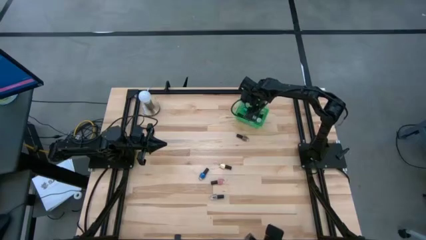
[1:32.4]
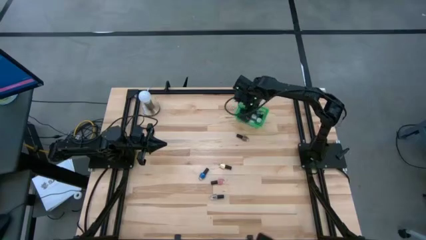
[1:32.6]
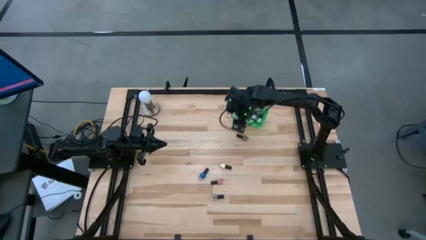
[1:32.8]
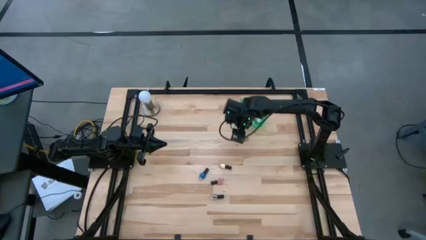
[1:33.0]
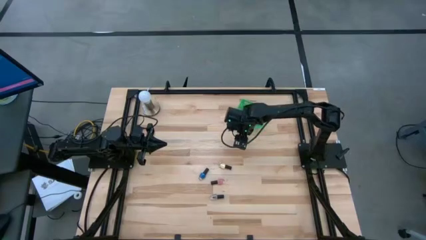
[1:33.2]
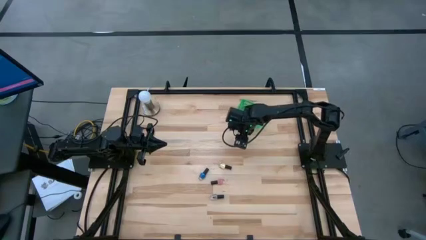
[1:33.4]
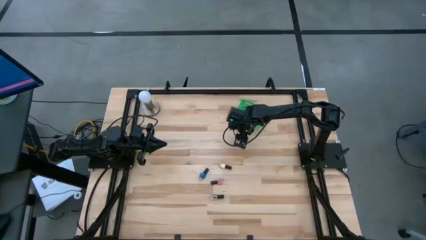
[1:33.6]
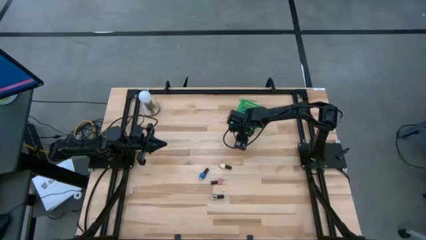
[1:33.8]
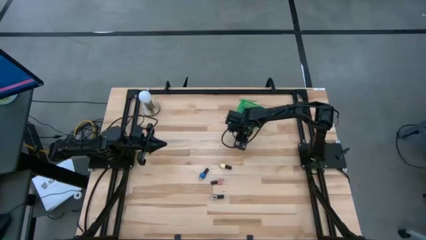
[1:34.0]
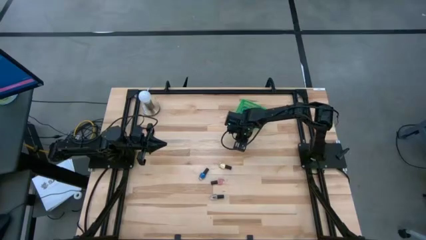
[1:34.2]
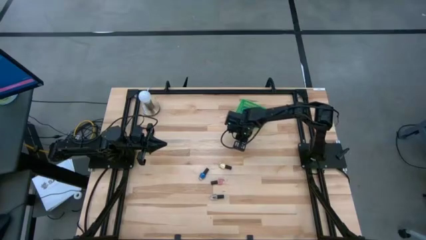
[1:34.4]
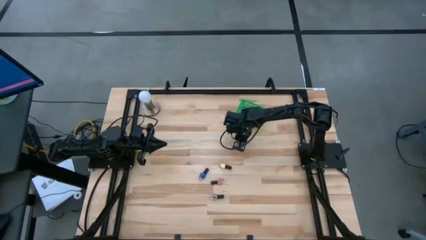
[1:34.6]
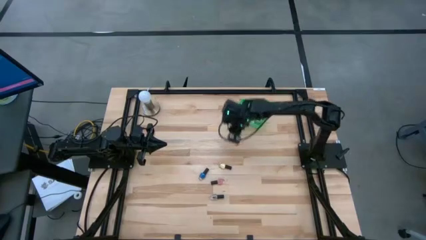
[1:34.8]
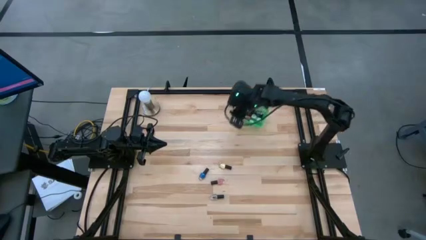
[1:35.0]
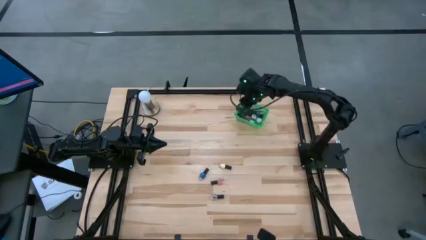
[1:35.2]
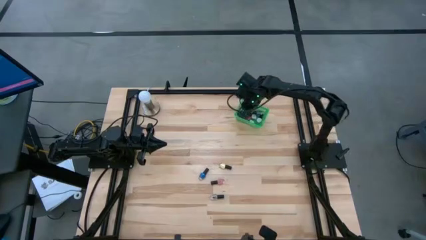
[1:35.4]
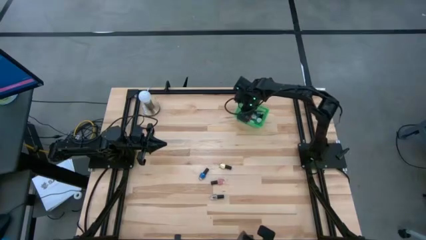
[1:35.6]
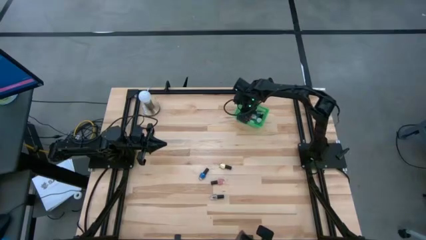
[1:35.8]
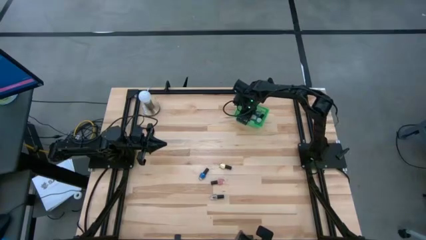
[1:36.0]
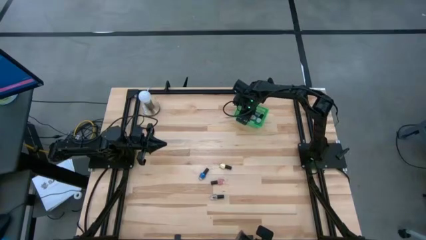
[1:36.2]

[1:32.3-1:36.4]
Task: Pick & Place Nail Polish
Put the brown nail polish into the green bin

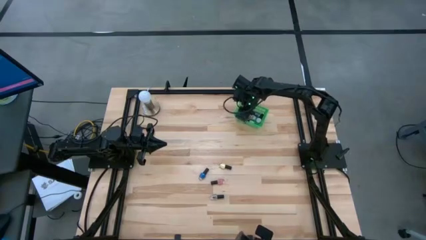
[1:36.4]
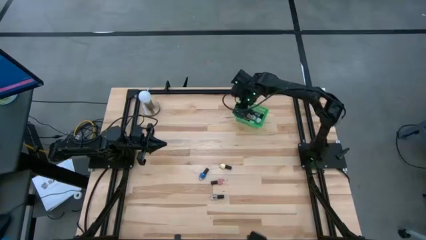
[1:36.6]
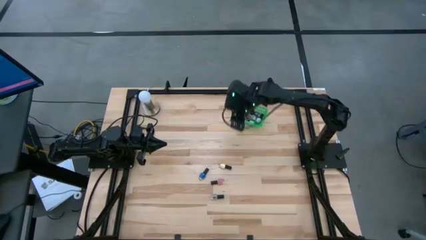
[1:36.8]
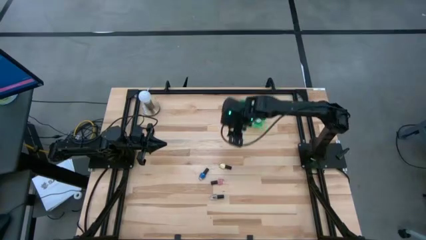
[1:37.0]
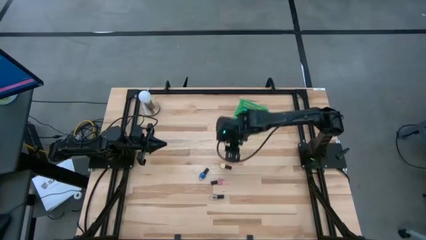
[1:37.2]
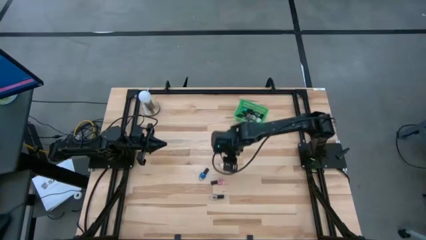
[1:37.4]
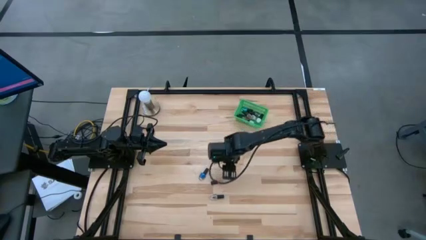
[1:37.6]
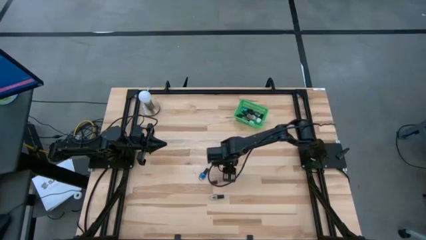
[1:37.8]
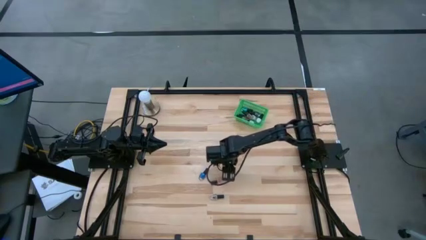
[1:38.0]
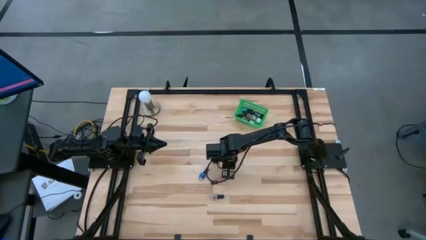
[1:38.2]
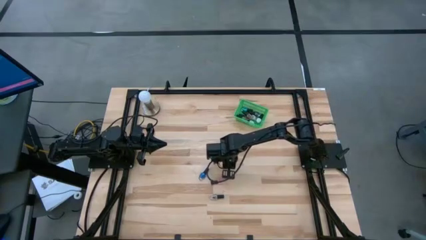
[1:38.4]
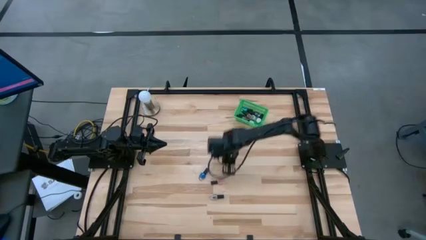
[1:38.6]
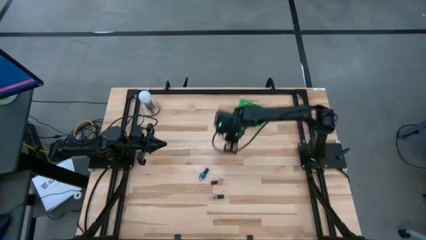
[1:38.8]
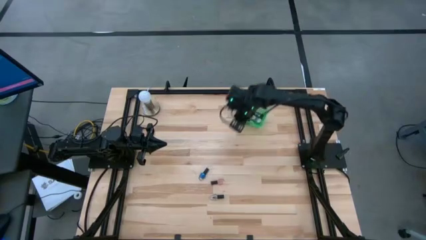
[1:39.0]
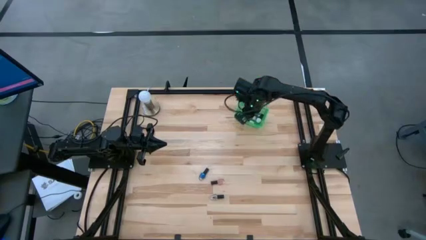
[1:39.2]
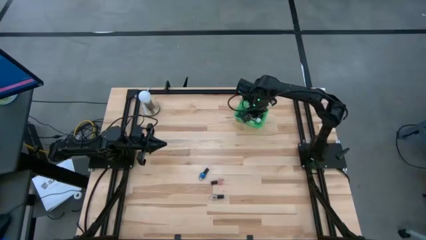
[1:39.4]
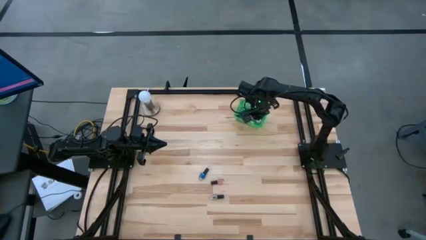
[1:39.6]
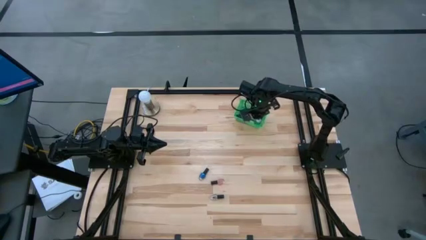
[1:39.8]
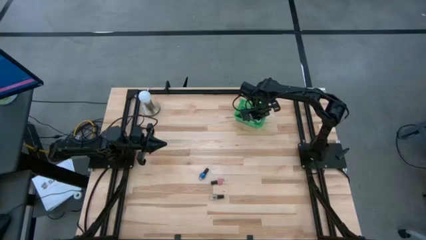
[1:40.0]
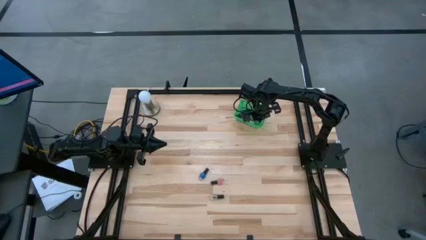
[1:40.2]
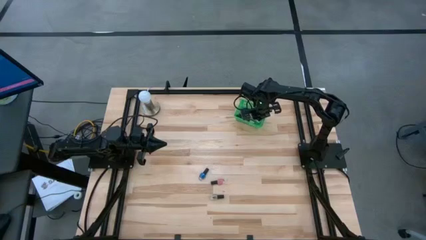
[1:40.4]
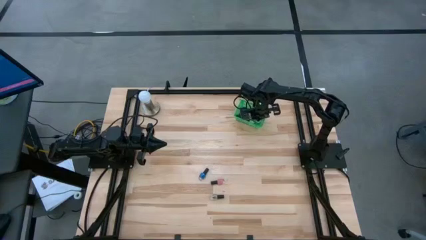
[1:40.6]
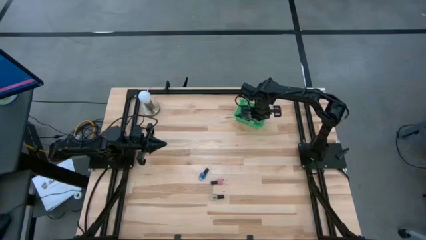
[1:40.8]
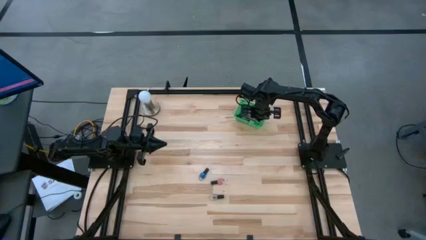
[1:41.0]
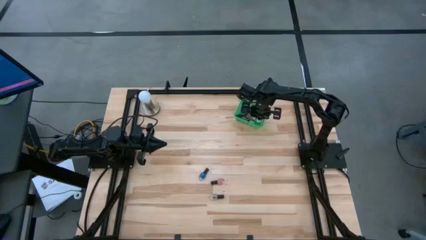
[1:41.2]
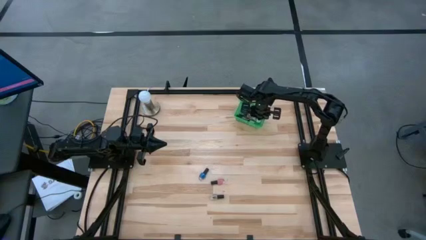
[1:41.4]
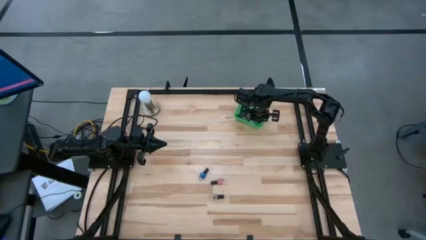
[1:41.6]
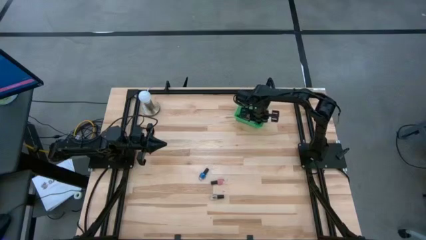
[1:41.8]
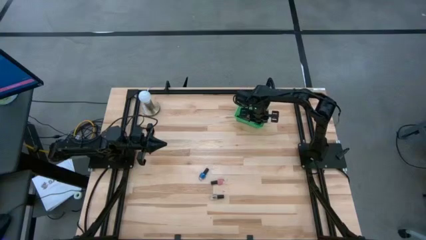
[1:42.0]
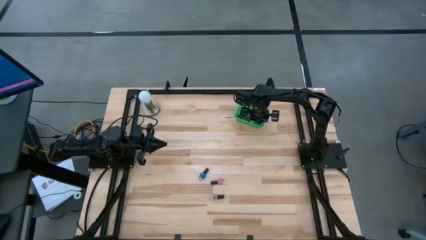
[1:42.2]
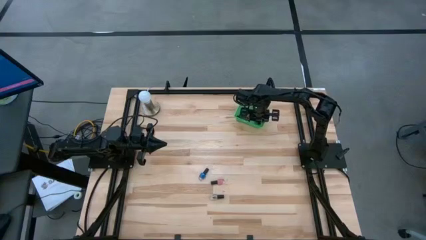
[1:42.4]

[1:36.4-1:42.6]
Put the yellow nail polish into the green bin

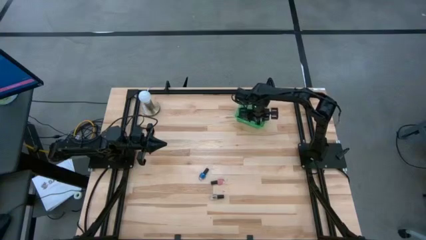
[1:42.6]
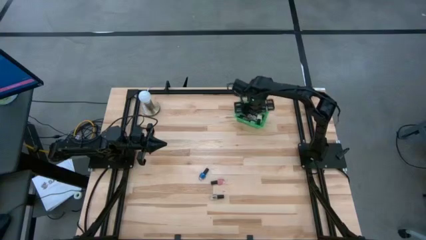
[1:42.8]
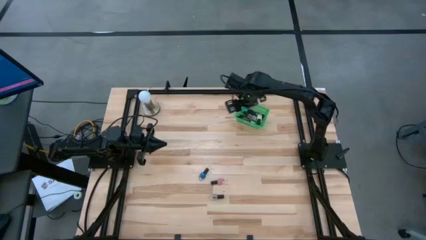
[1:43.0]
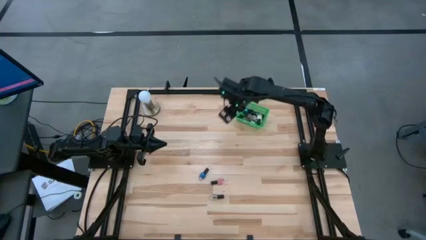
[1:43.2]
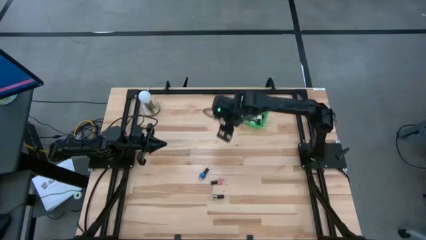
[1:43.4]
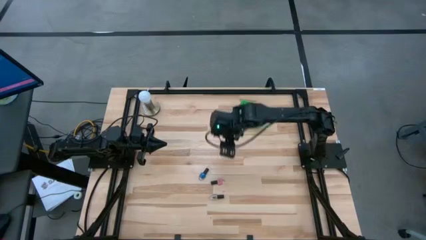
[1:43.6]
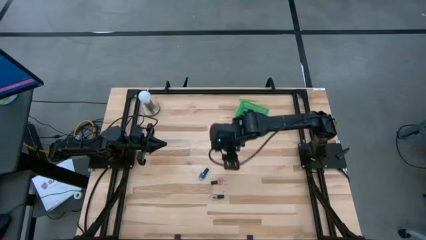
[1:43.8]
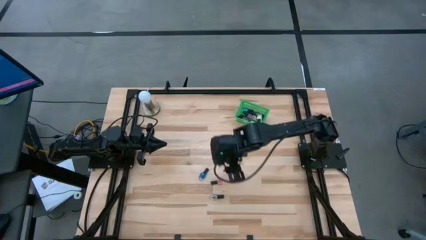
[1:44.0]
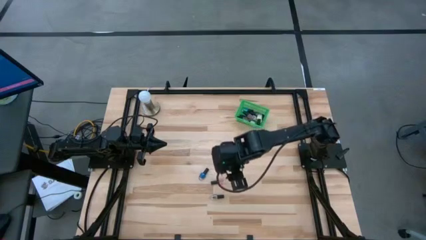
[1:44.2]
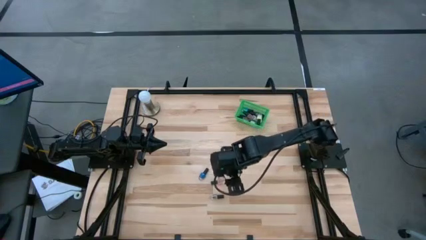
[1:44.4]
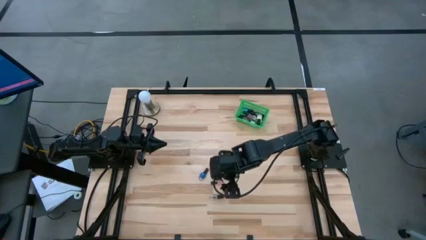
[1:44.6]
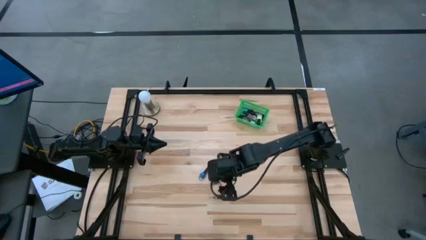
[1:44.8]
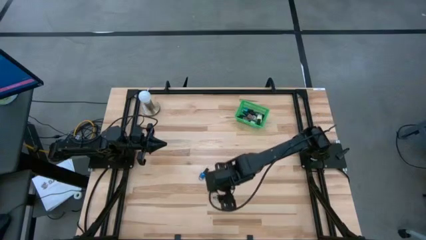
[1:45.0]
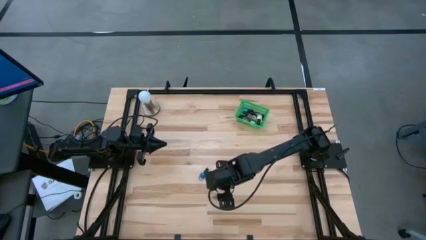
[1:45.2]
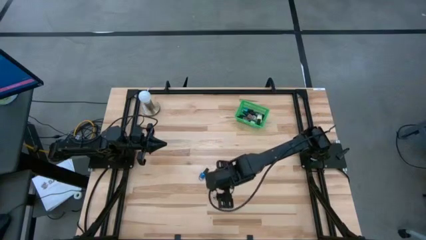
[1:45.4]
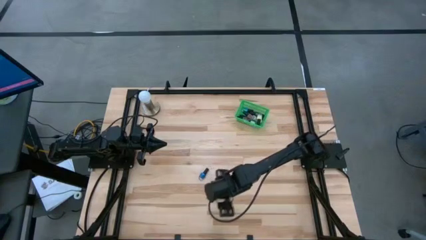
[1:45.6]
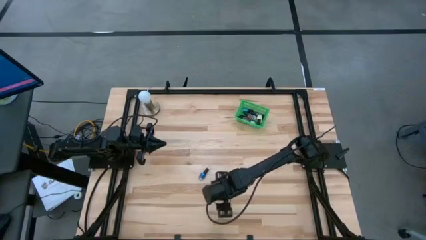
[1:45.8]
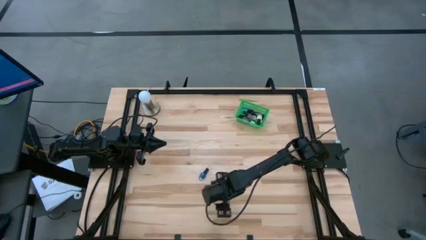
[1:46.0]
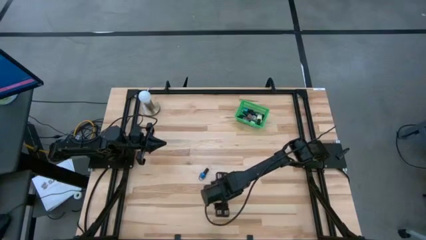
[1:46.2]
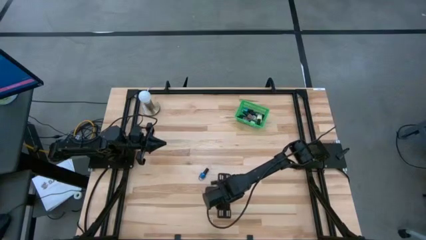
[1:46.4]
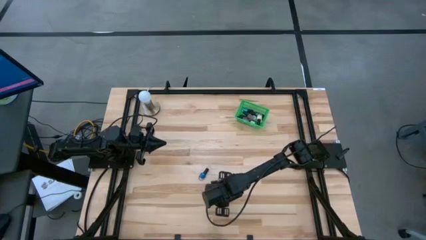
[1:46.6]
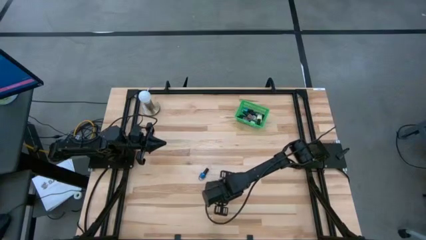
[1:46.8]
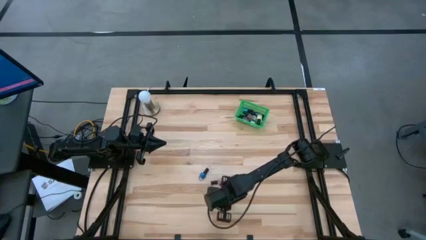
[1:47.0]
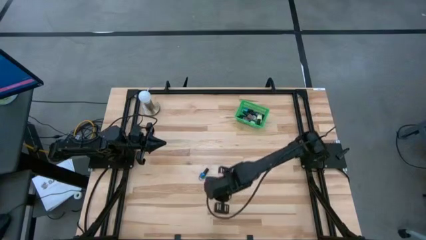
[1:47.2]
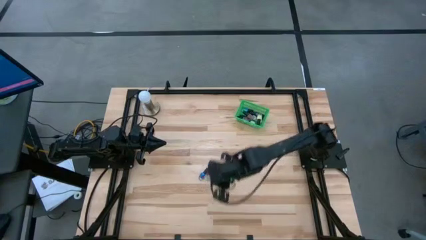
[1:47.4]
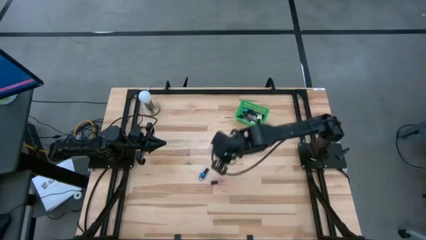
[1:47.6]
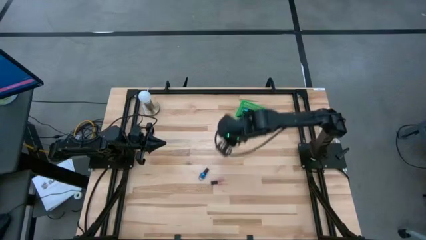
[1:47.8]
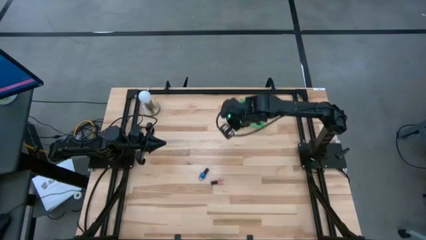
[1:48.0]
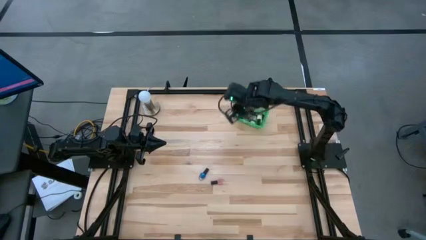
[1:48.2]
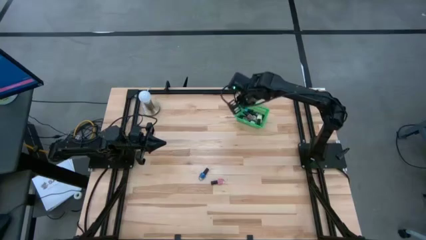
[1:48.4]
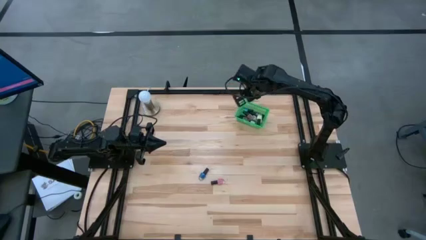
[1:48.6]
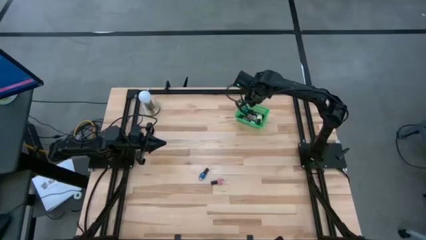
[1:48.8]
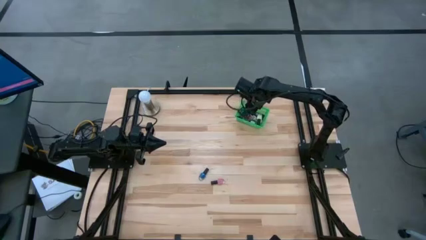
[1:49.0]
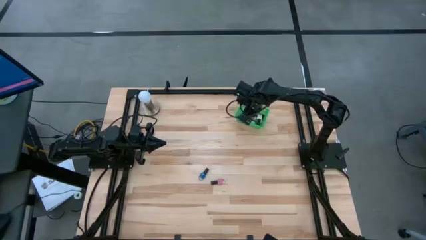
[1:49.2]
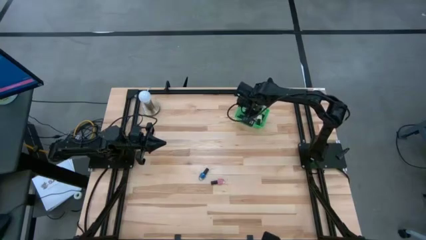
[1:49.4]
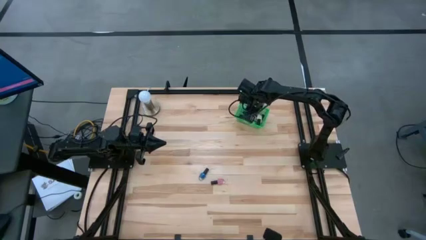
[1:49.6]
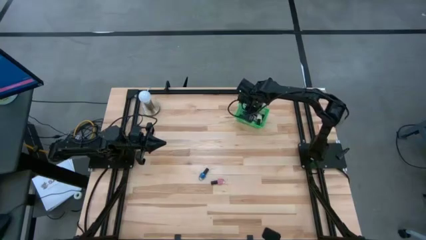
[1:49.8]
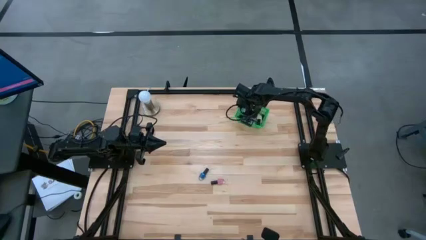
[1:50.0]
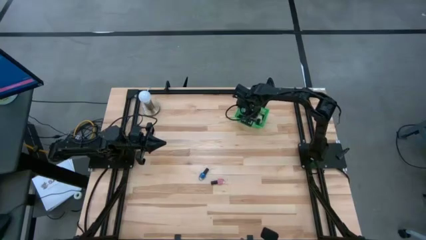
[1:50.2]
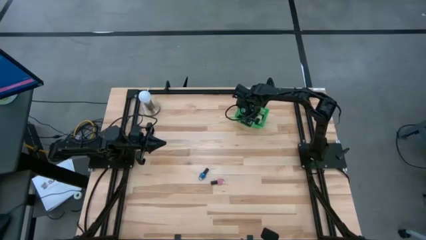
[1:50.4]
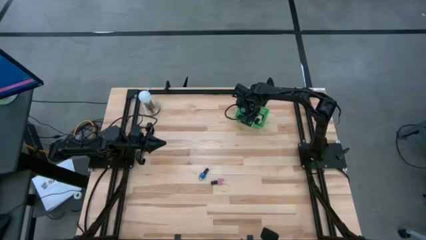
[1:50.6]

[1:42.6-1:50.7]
Put the transparent nail polish into the green bin
